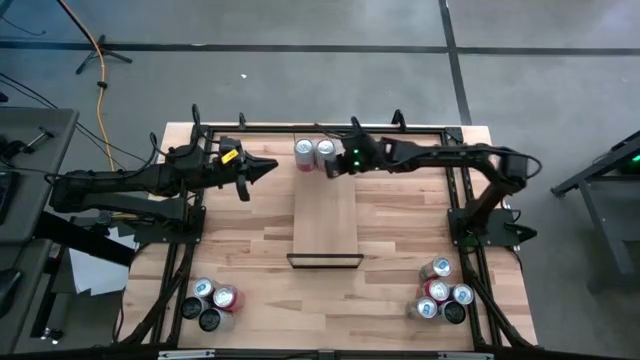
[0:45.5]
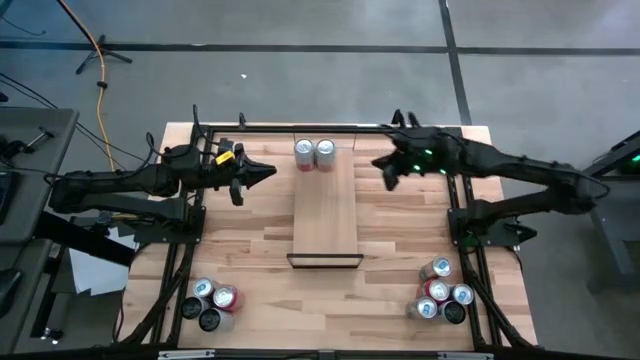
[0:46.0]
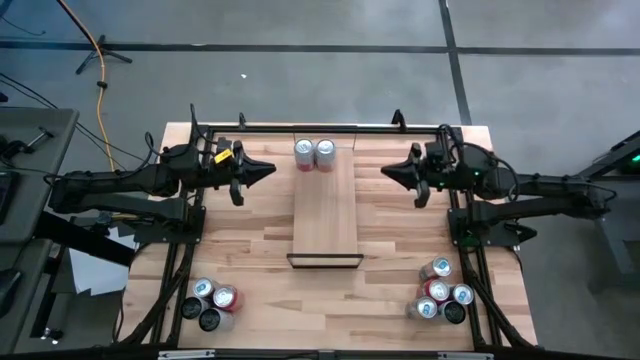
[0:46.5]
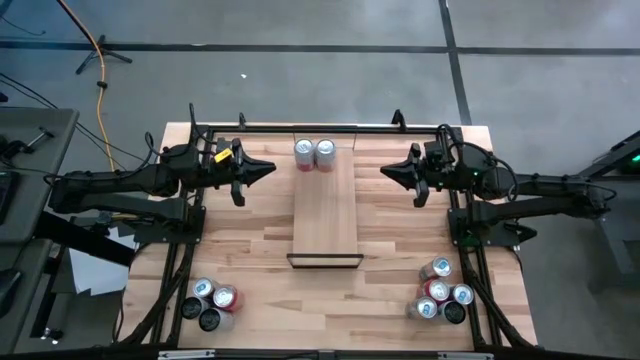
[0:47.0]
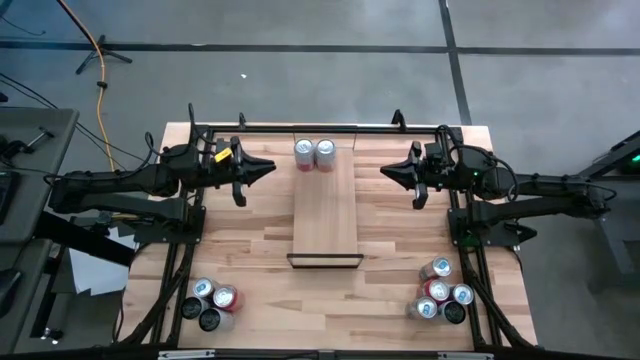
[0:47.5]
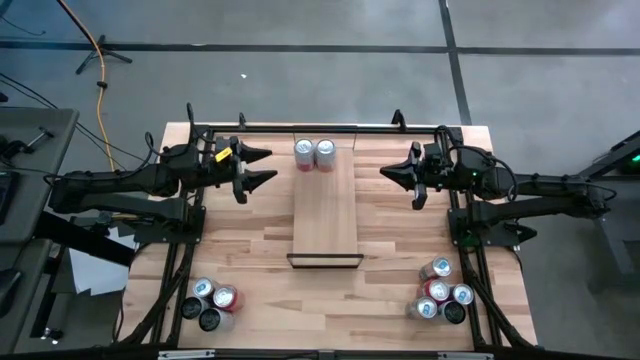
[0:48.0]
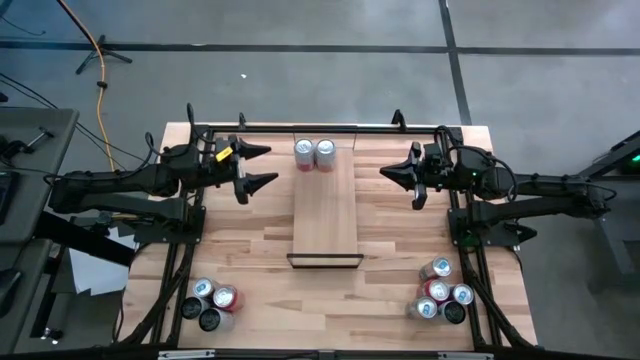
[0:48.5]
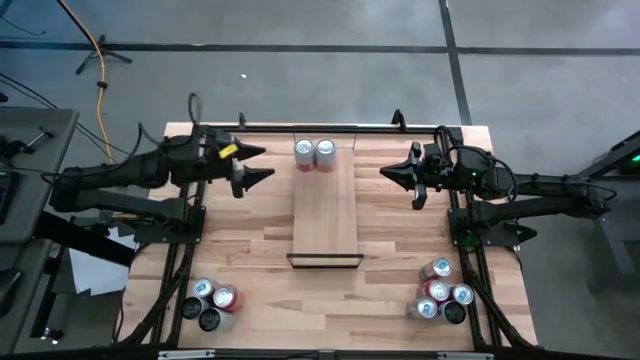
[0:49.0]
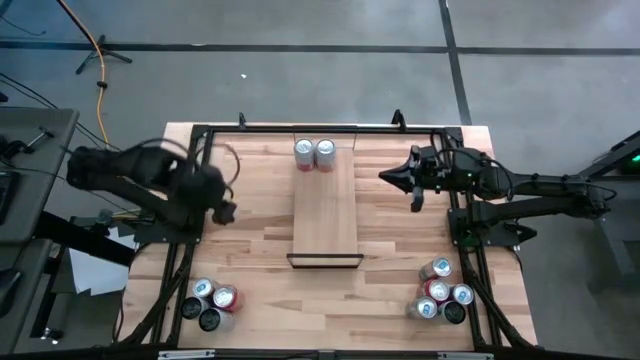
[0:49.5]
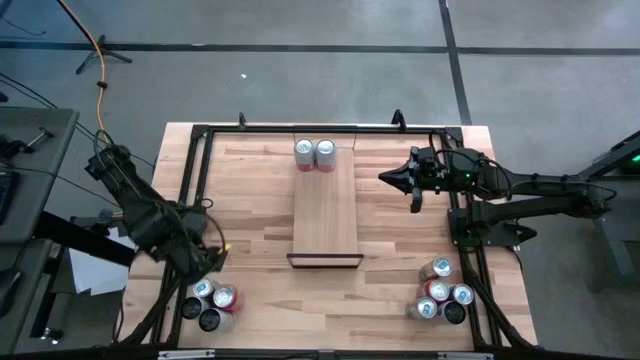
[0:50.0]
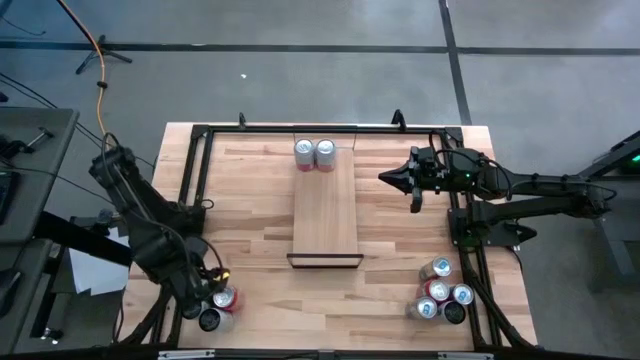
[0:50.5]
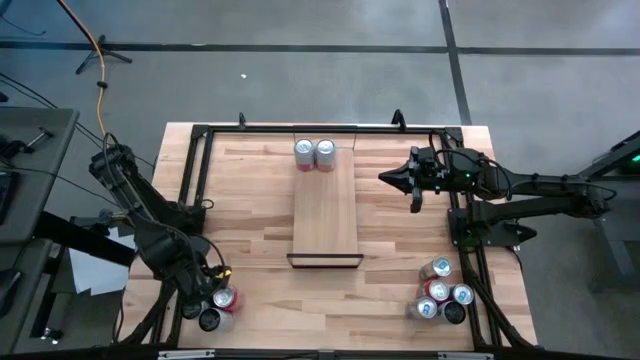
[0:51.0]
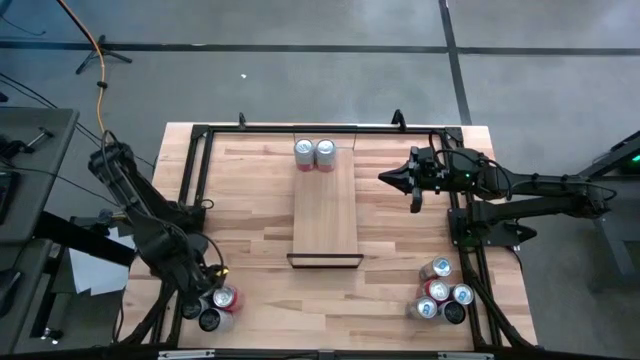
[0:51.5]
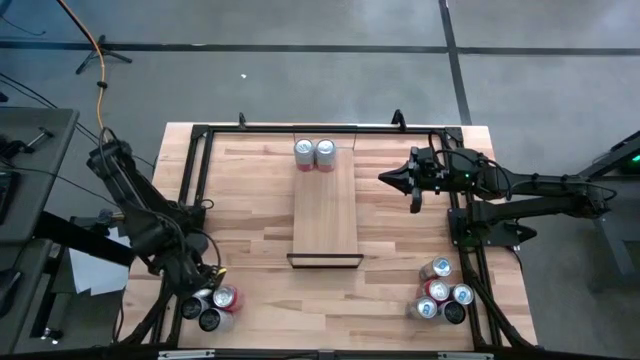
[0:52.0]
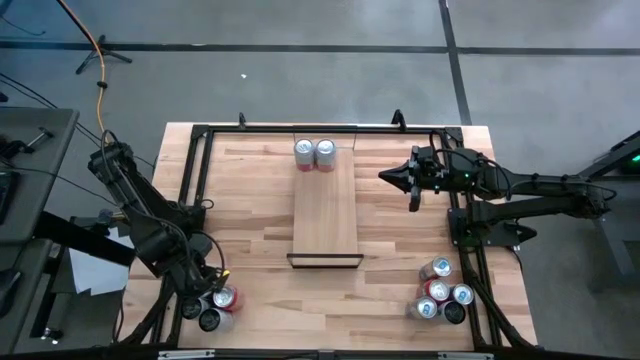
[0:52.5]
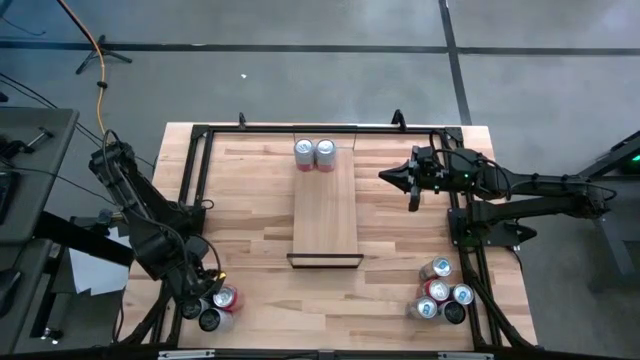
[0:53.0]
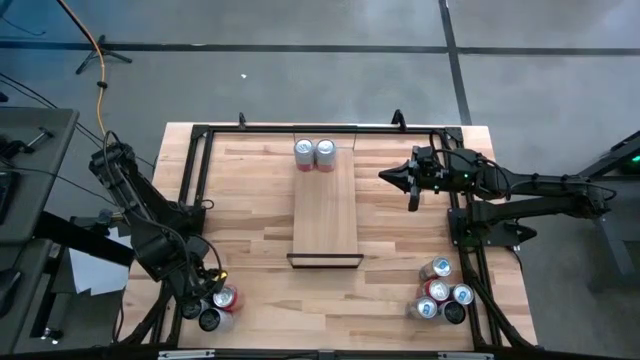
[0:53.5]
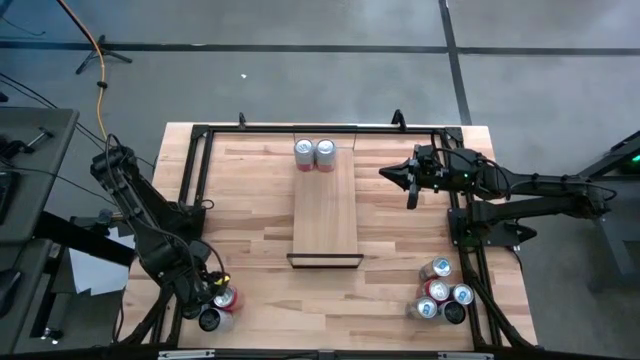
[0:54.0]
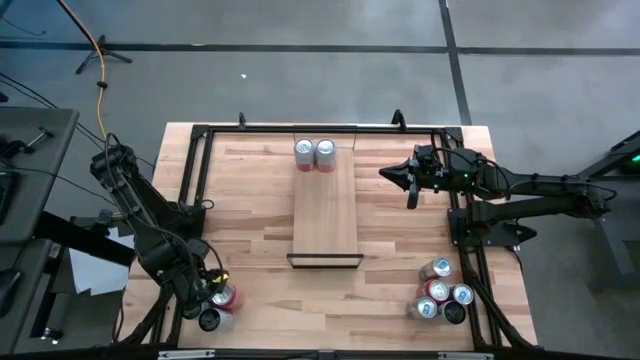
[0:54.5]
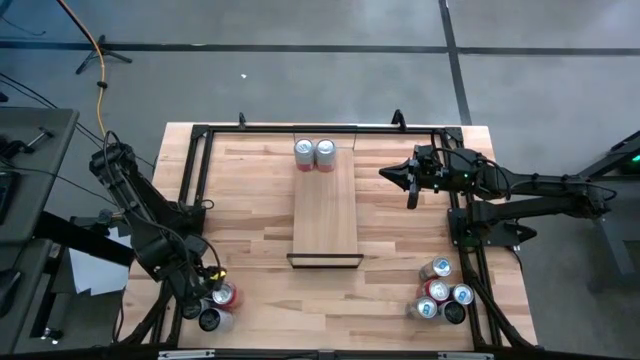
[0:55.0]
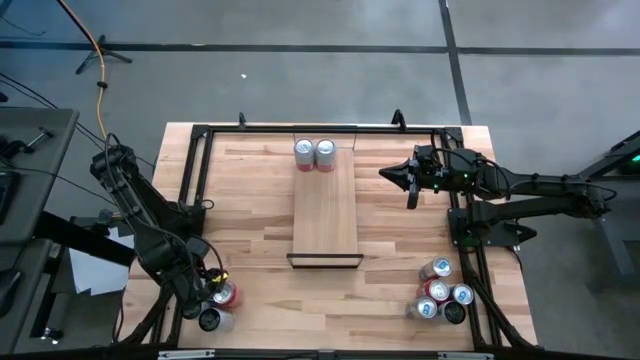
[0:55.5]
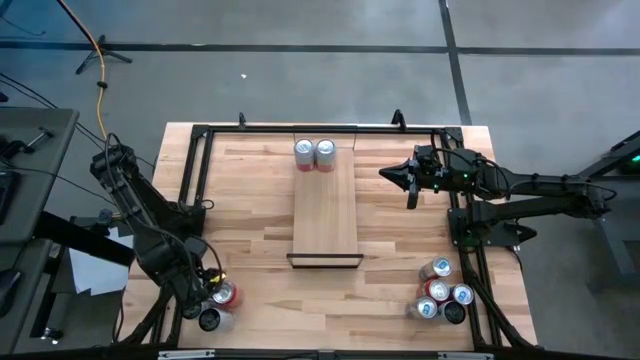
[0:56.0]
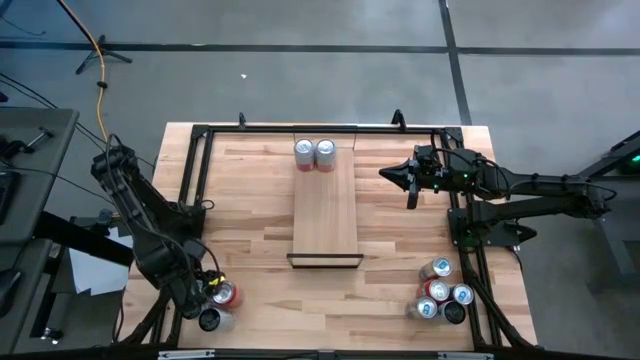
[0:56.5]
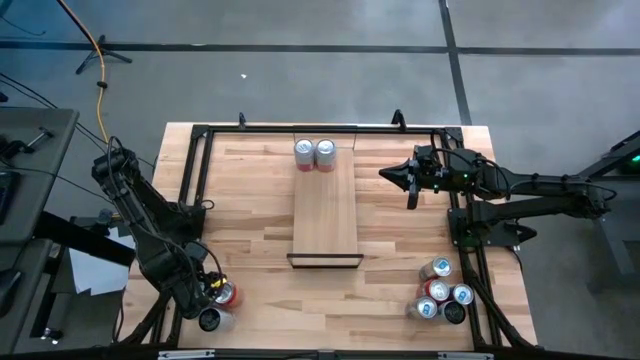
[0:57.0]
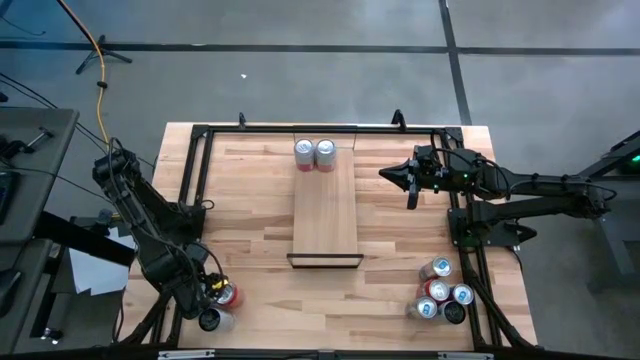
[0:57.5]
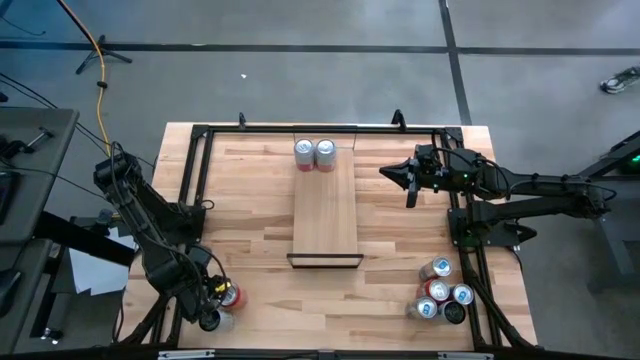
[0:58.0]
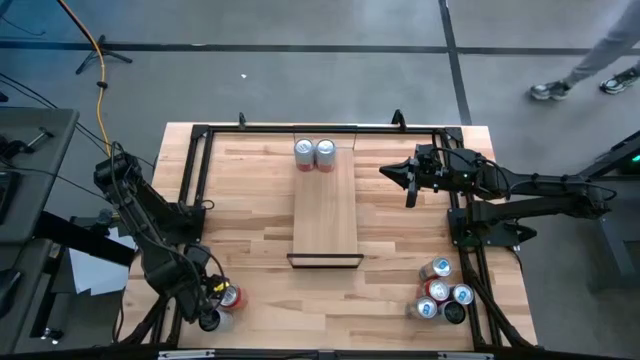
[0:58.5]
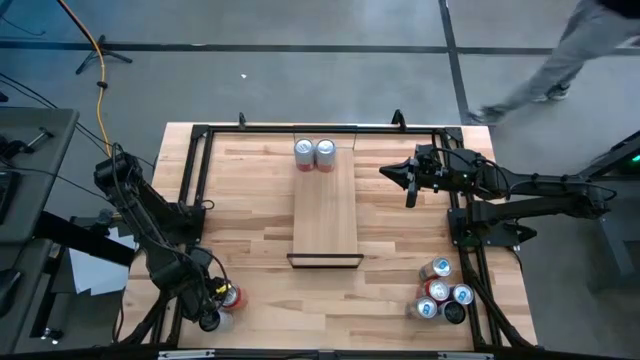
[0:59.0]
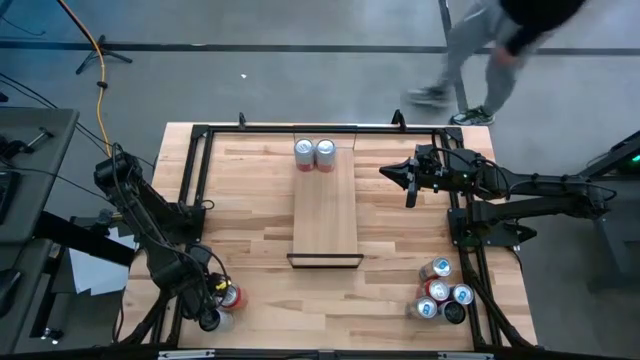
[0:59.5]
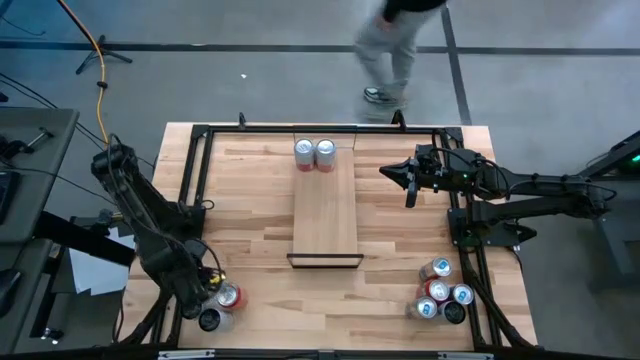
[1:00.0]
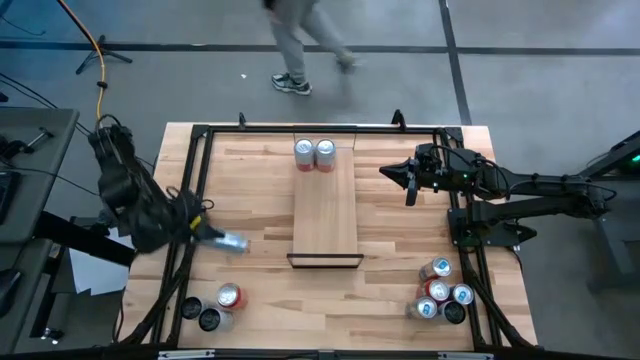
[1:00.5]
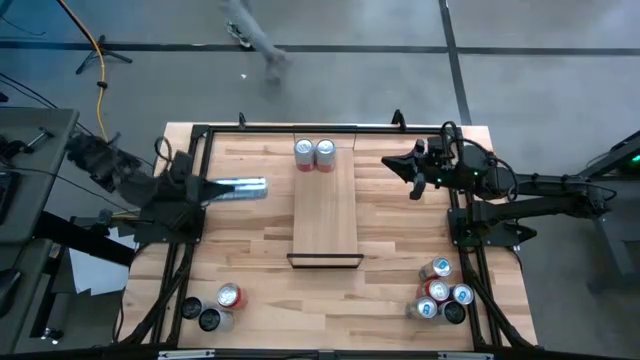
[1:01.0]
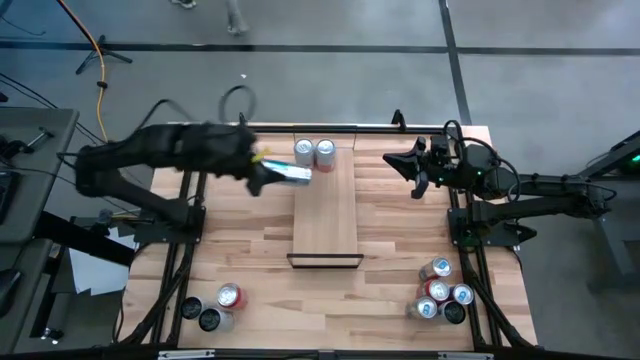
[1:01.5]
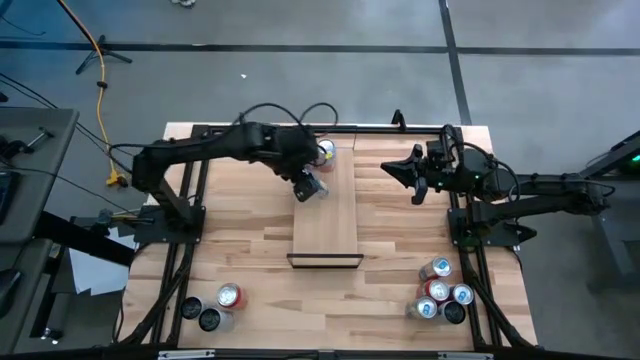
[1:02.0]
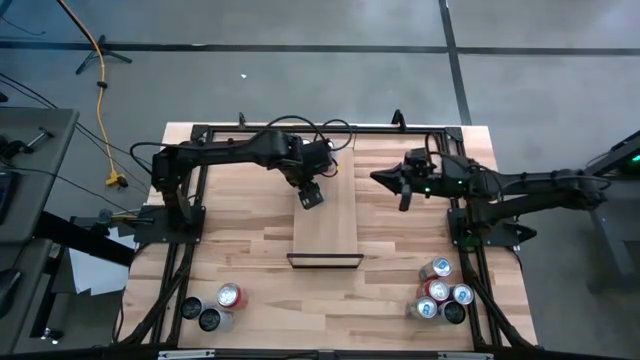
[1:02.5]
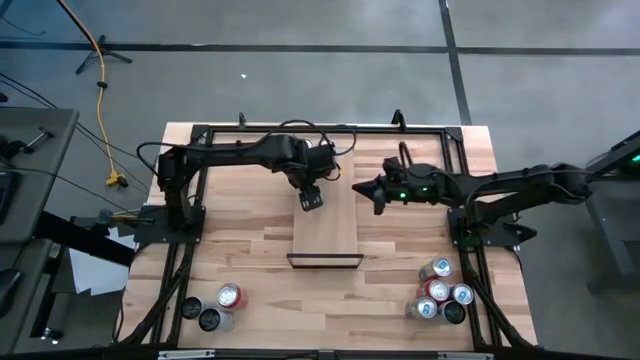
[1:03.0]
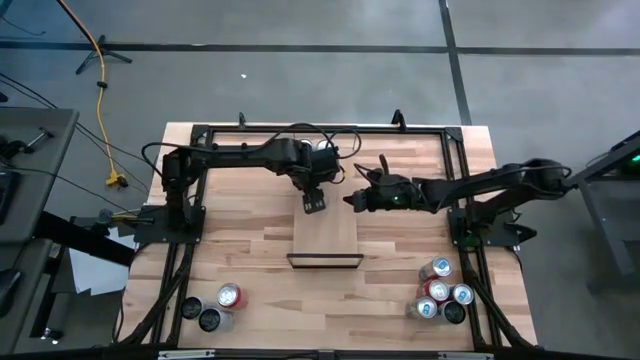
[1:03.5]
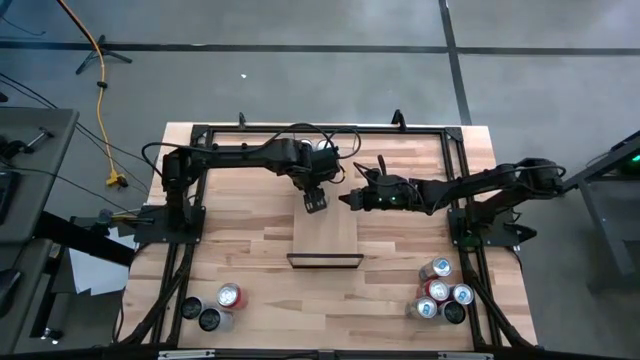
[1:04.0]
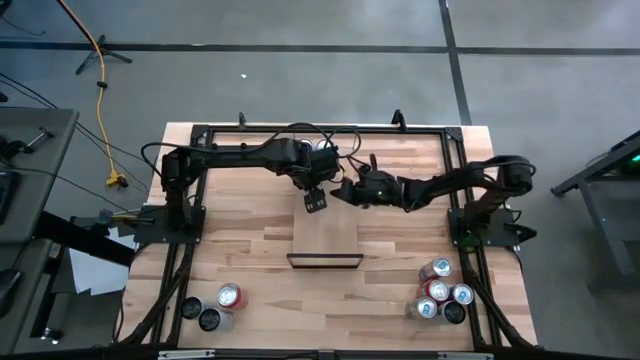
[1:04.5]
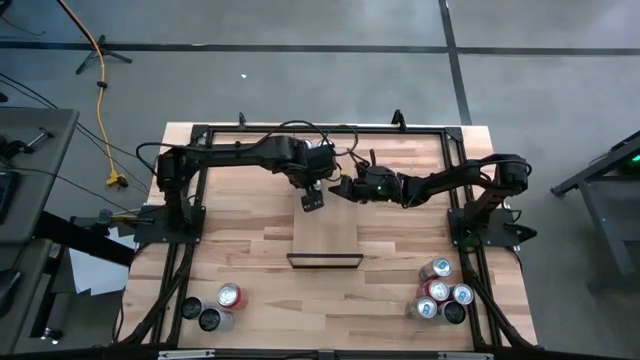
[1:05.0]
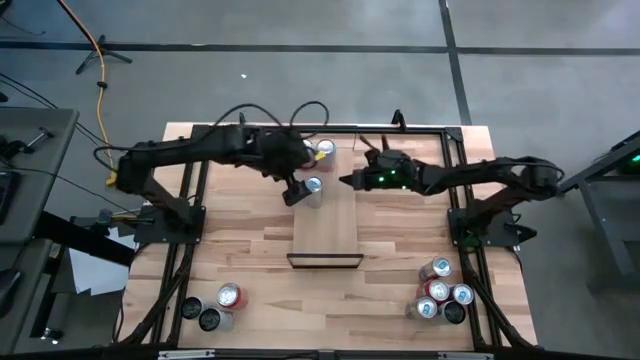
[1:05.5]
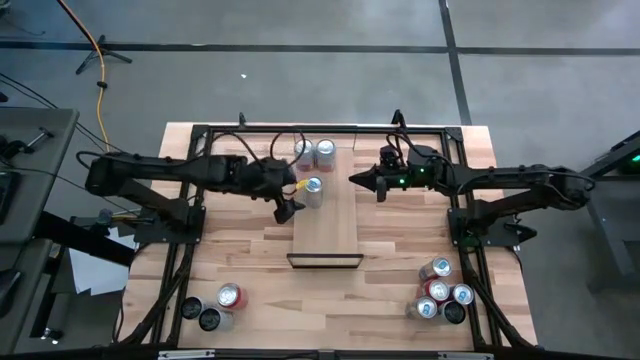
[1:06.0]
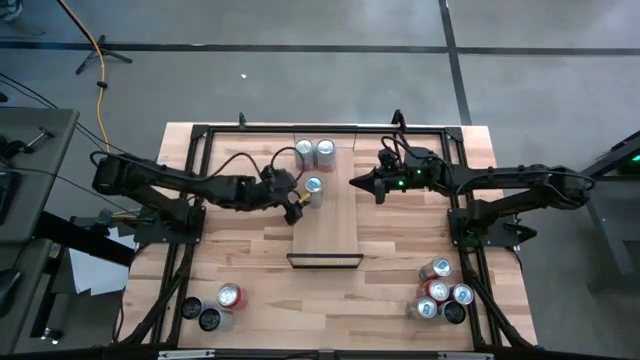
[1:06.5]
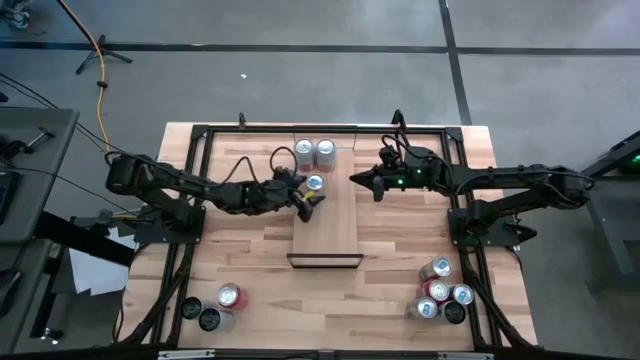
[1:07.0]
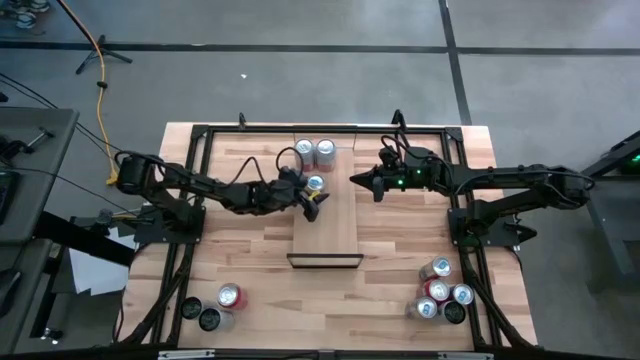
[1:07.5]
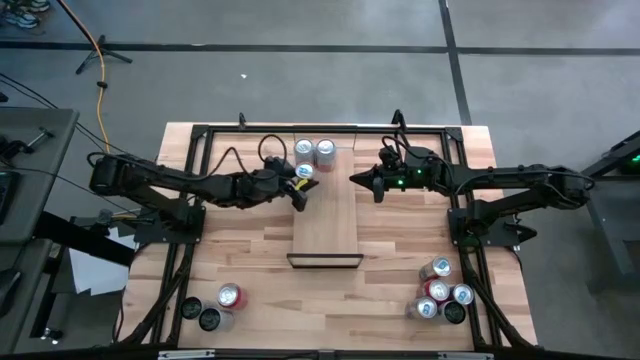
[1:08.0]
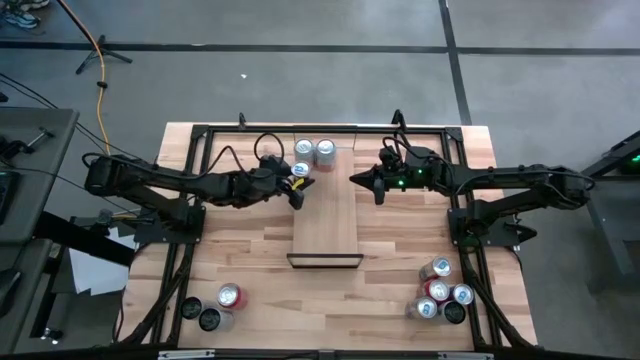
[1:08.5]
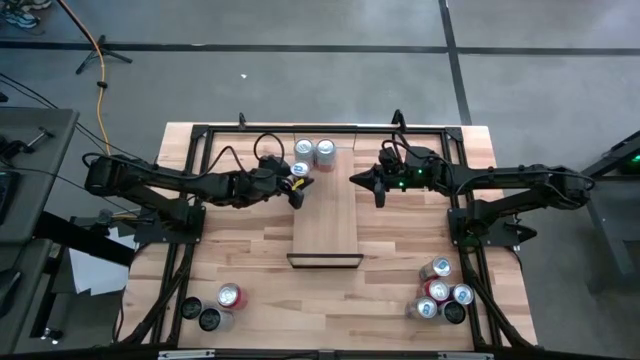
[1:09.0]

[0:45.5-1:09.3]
Task: Place canned beverage on shelf
Put the blue soda can on the shelf
